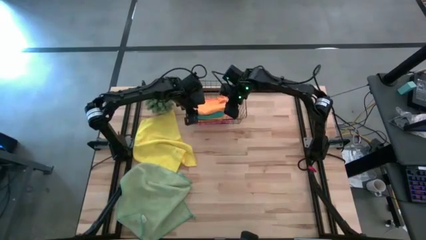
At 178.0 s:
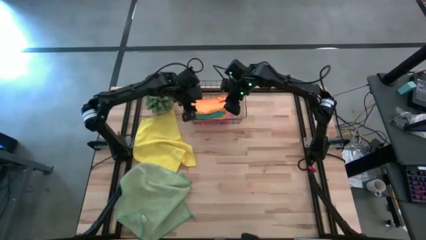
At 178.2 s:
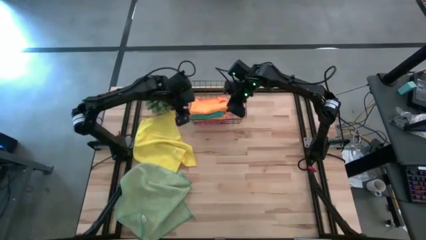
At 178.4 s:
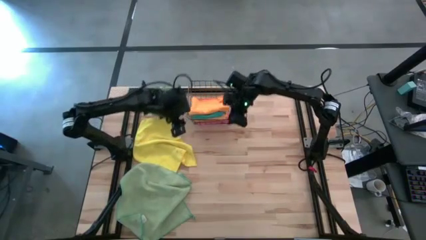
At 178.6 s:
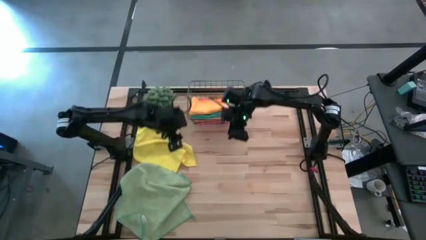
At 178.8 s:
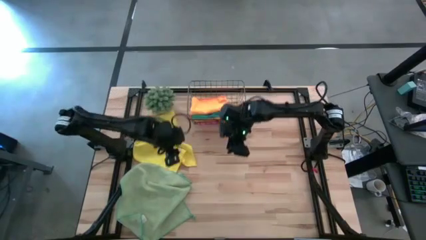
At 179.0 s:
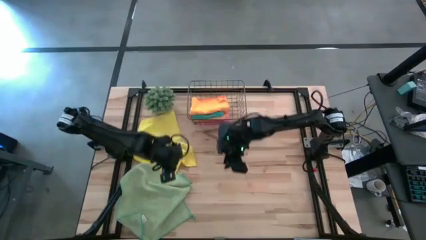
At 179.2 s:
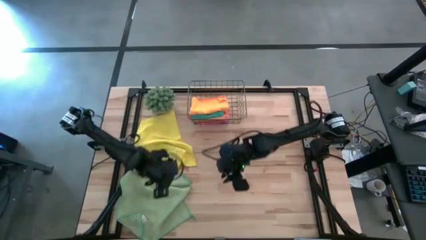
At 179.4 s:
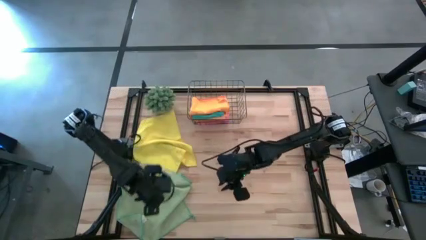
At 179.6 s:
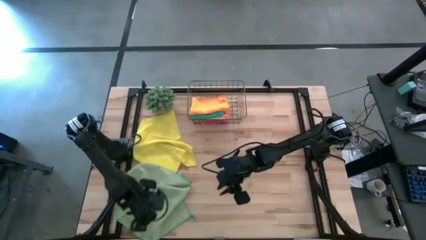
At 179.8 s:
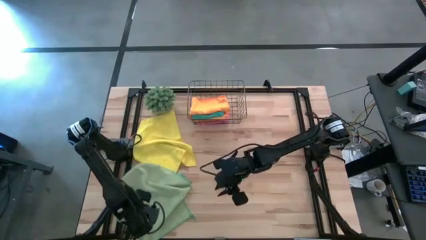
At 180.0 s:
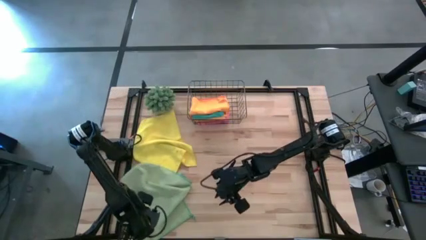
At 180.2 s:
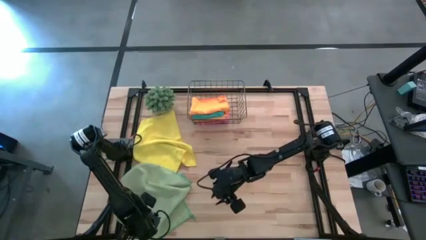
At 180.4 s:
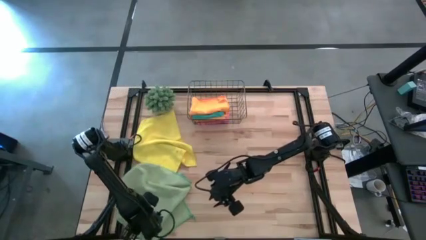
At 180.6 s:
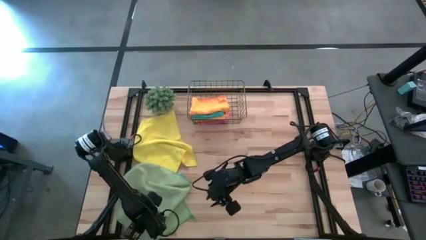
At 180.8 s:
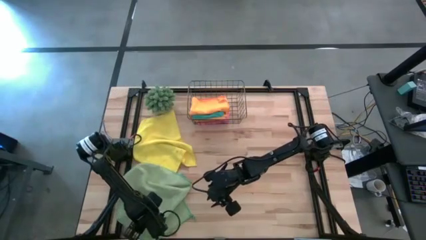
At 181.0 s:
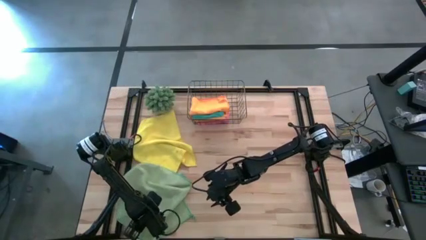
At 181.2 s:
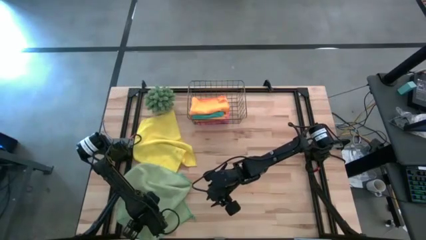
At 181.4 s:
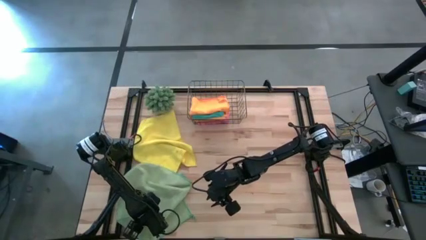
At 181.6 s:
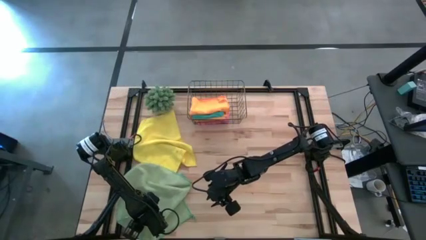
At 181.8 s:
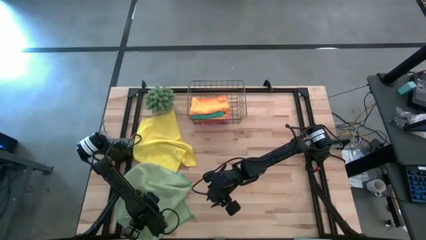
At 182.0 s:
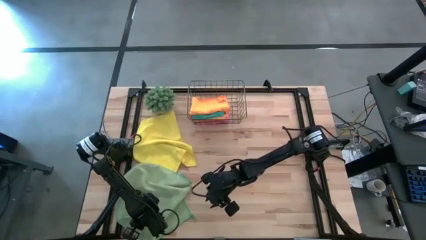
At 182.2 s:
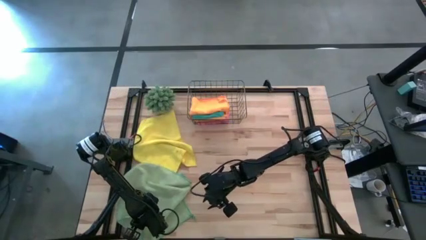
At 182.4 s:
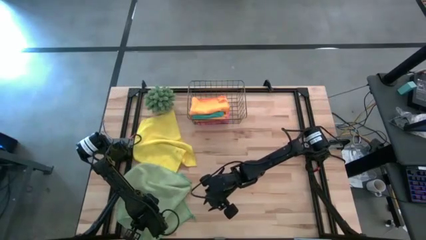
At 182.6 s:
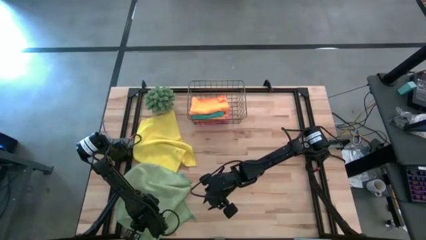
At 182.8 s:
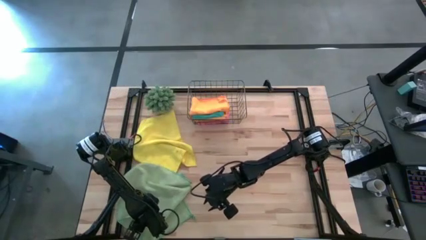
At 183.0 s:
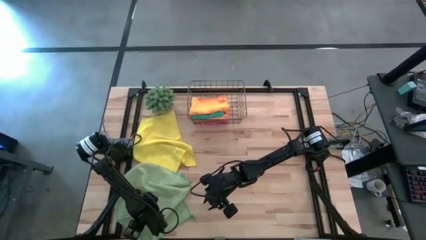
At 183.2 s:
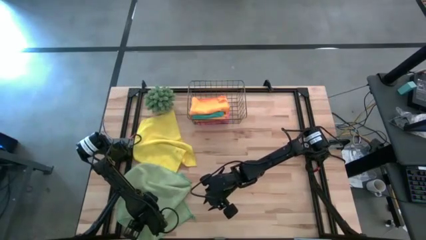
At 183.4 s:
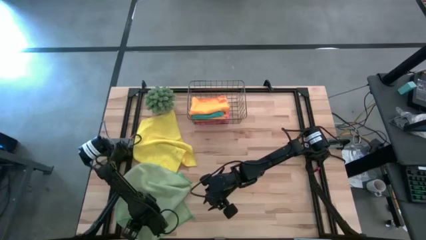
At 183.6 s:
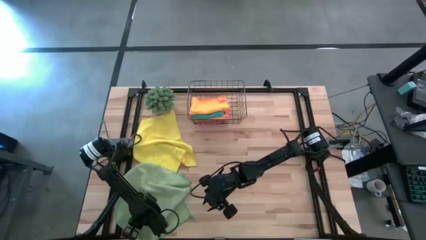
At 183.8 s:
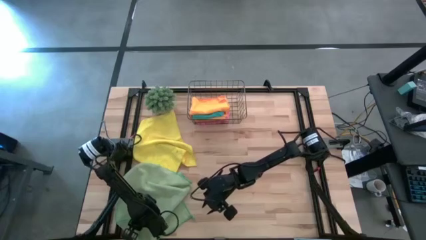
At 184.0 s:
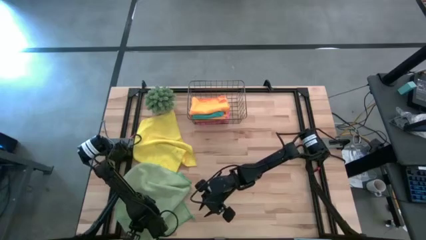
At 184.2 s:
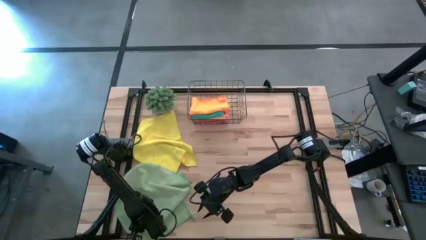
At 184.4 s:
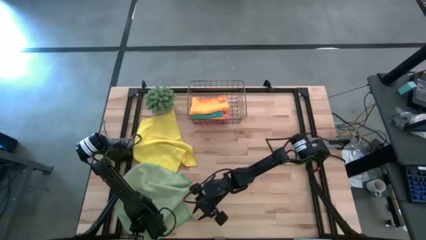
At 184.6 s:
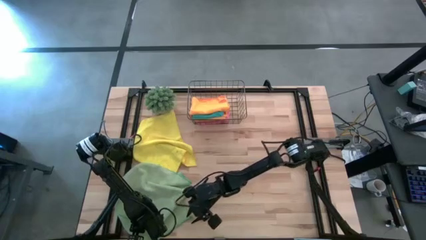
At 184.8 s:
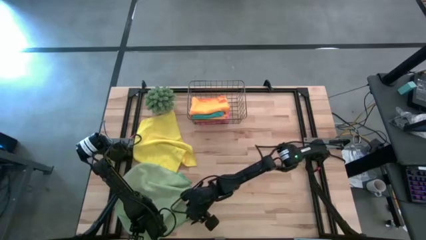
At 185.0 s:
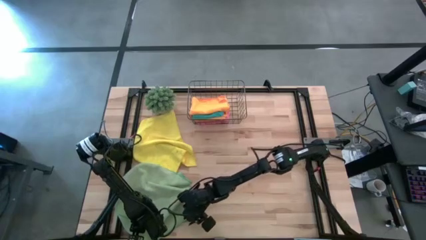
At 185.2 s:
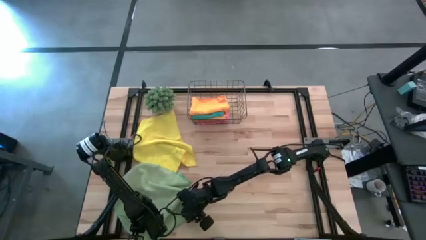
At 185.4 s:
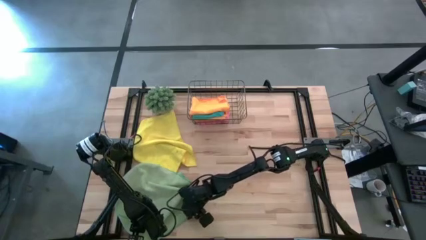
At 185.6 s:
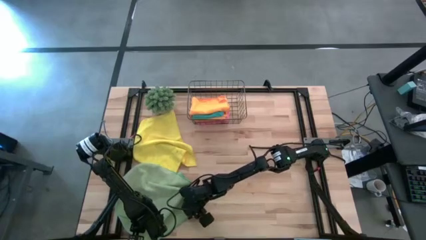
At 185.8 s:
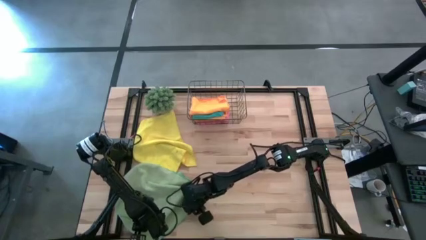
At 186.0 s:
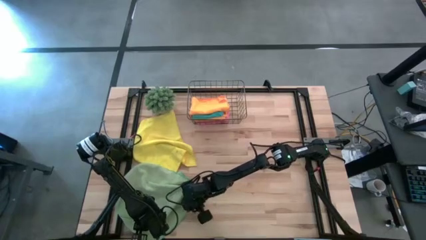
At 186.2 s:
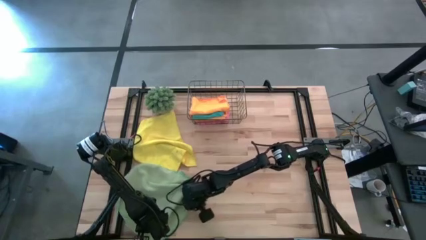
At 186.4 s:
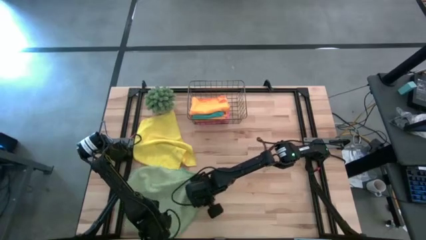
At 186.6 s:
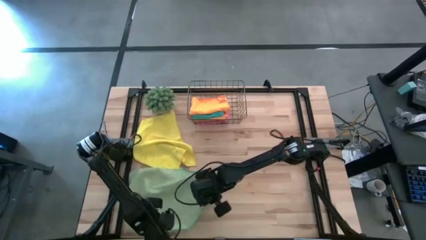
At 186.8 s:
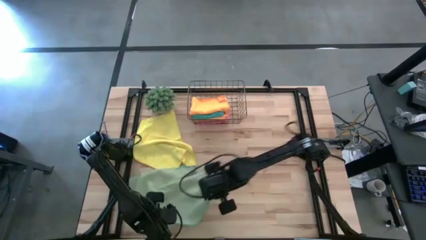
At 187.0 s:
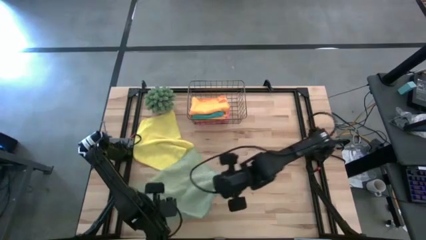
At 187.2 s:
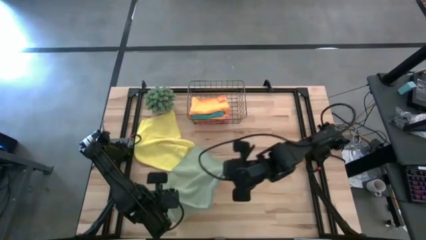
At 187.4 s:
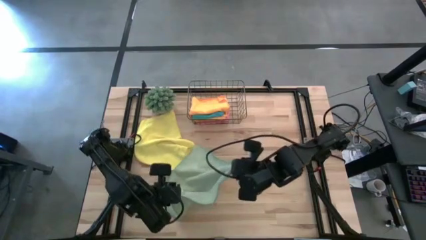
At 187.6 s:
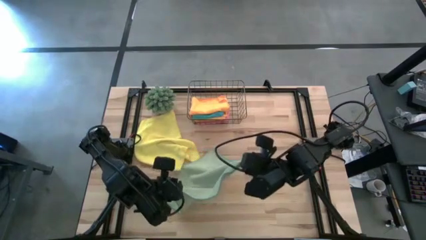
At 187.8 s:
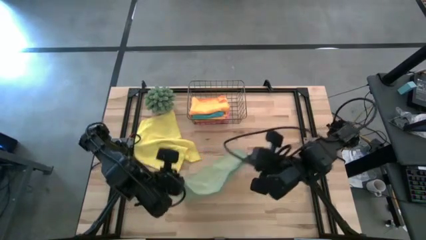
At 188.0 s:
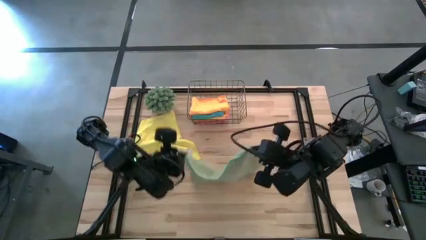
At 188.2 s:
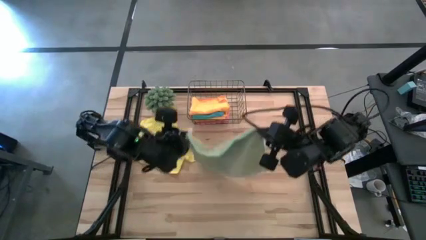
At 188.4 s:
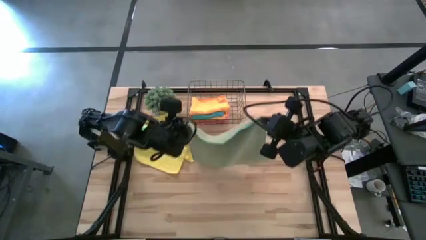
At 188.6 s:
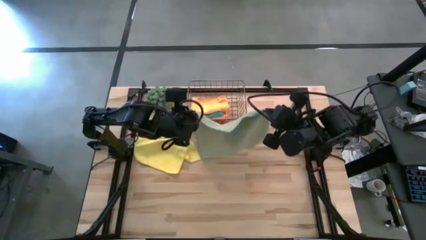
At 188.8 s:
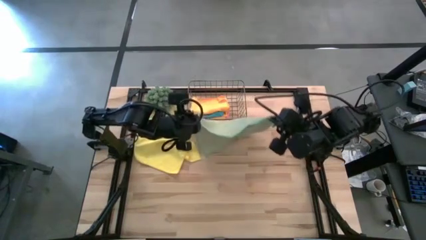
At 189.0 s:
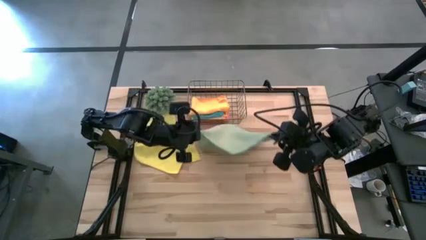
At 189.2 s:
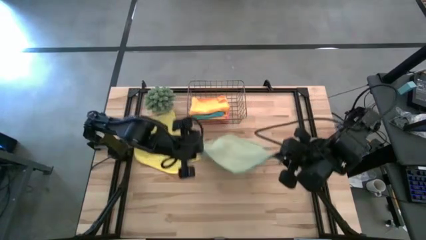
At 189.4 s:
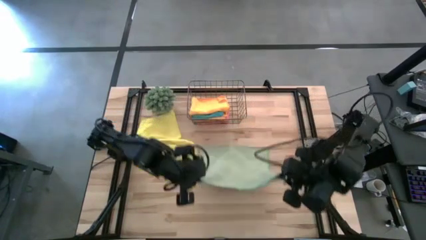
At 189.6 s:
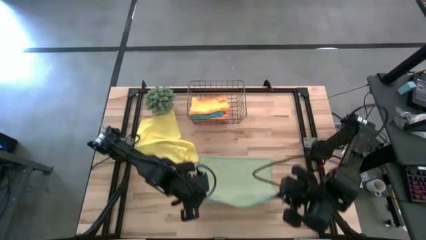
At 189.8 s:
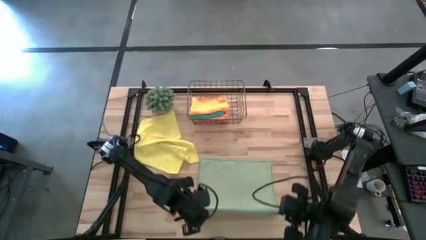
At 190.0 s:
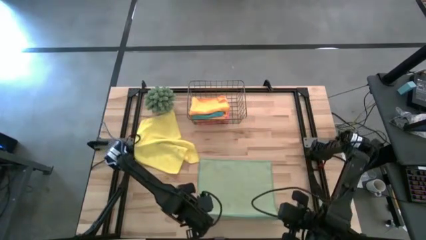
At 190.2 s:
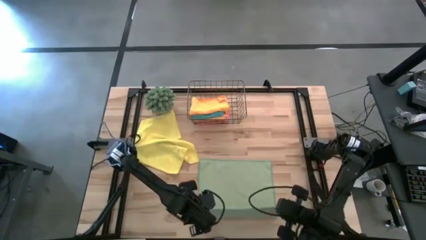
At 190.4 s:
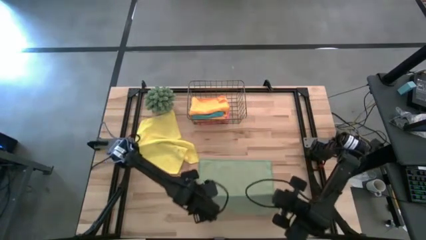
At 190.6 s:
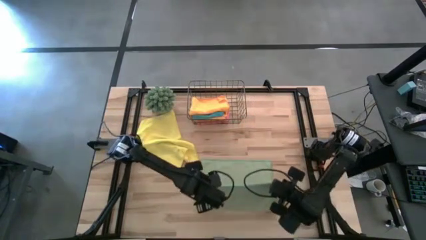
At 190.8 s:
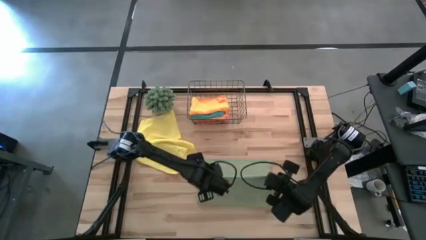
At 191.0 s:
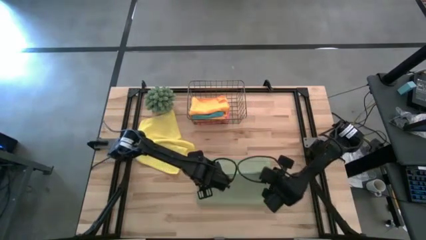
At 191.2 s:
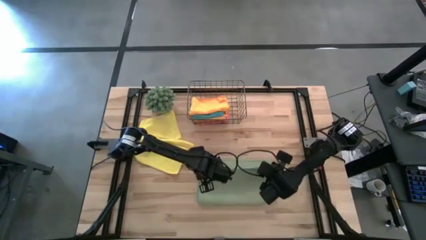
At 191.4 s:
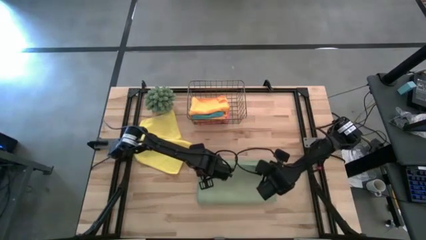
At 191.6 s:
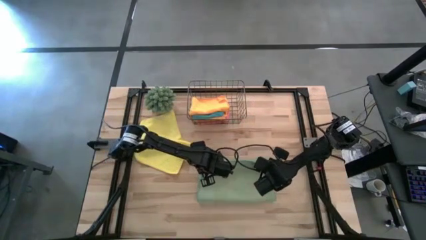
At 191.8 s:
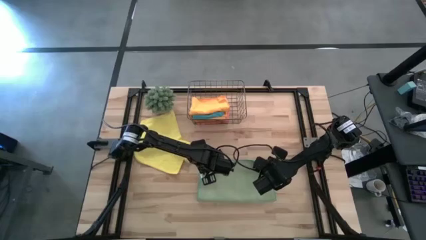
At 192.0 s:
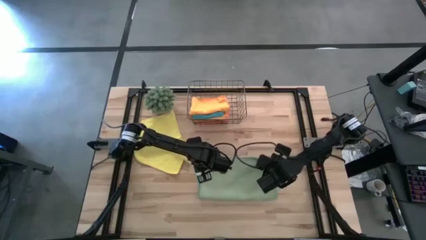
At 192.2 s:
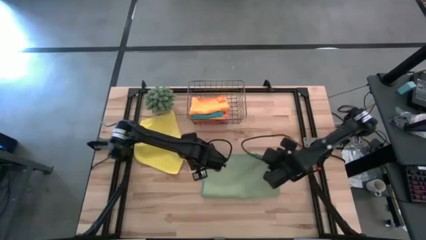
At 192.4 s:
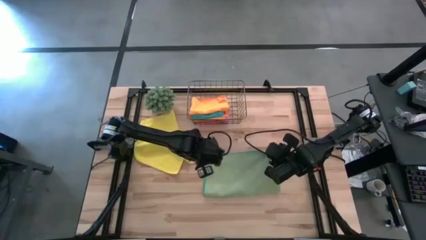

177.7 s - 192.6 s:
Task: Fold microfiber towels
Fold the light green microfiber towel
